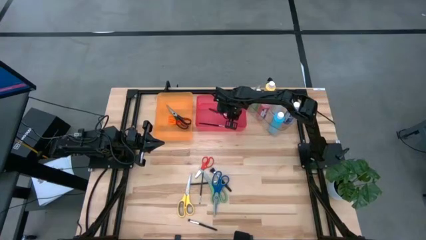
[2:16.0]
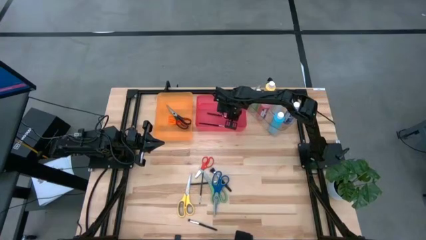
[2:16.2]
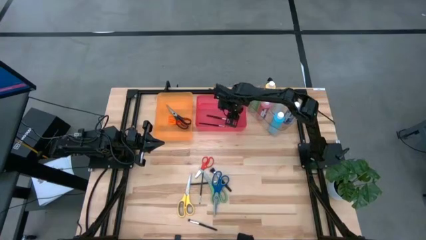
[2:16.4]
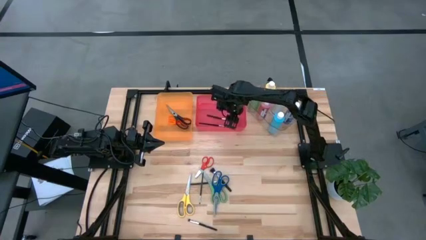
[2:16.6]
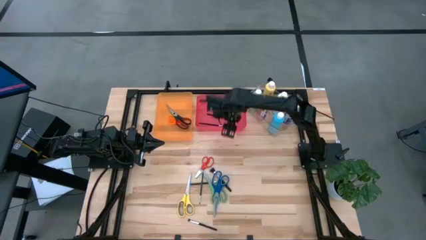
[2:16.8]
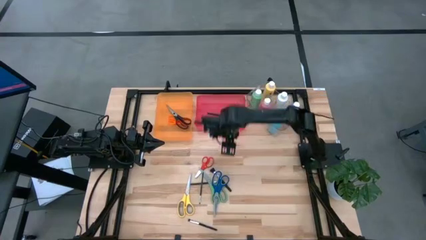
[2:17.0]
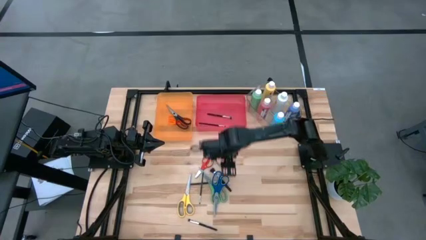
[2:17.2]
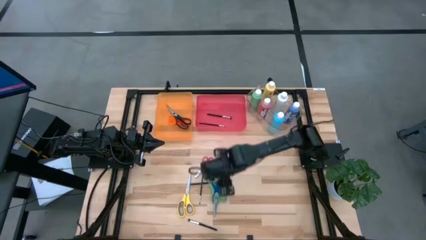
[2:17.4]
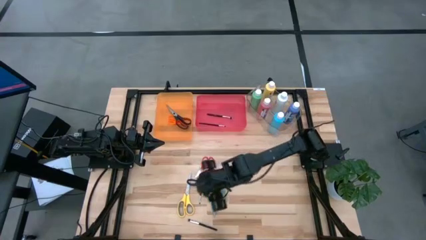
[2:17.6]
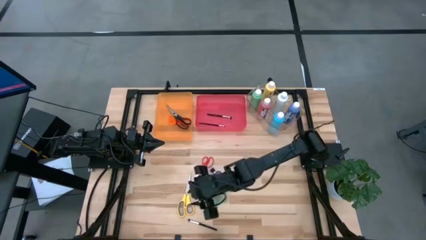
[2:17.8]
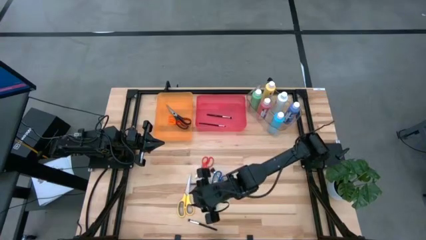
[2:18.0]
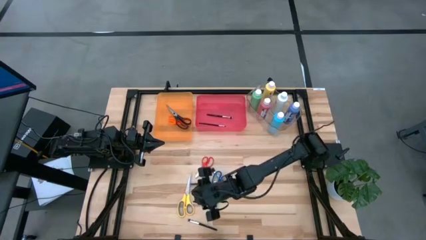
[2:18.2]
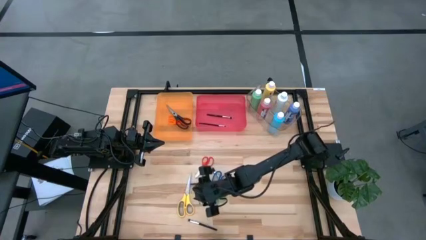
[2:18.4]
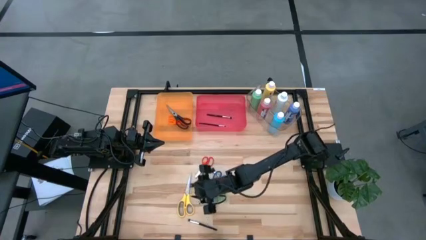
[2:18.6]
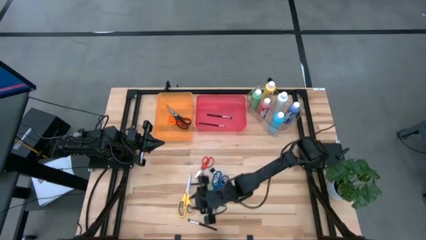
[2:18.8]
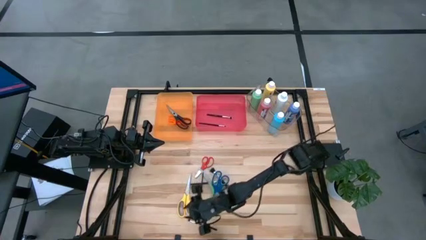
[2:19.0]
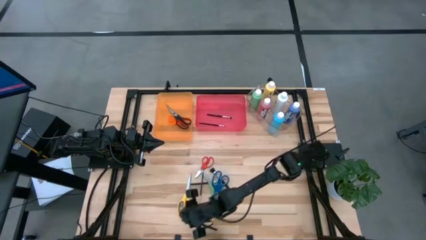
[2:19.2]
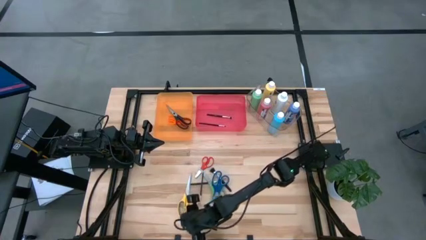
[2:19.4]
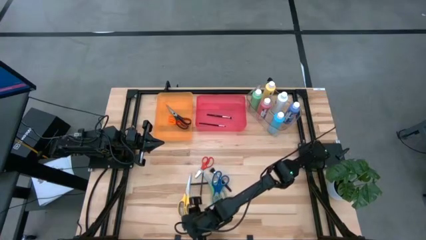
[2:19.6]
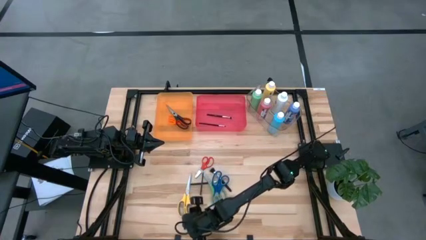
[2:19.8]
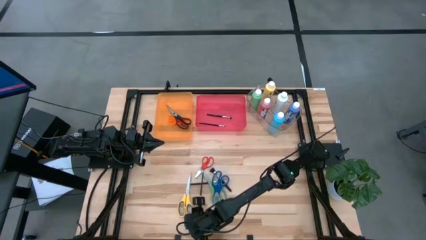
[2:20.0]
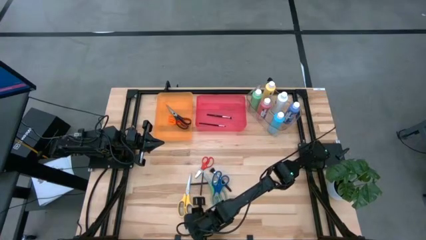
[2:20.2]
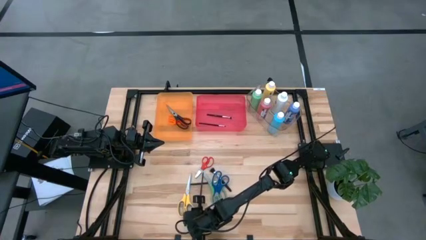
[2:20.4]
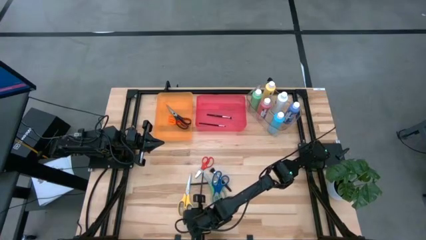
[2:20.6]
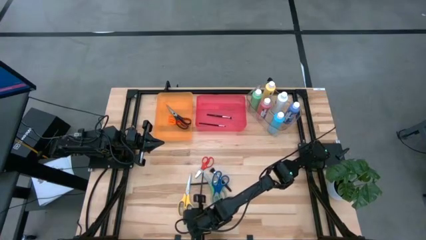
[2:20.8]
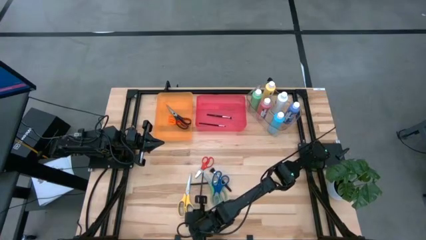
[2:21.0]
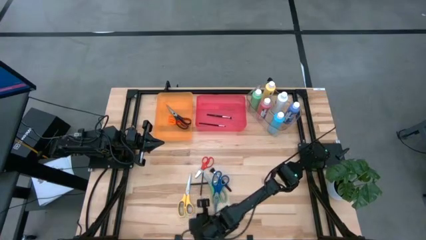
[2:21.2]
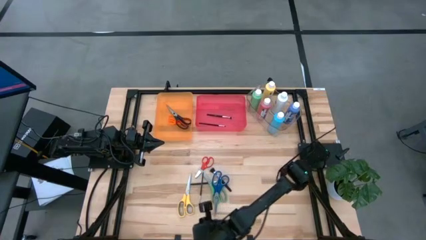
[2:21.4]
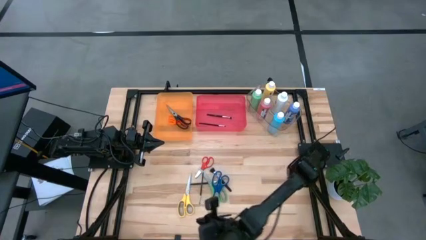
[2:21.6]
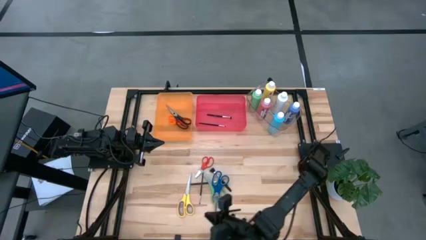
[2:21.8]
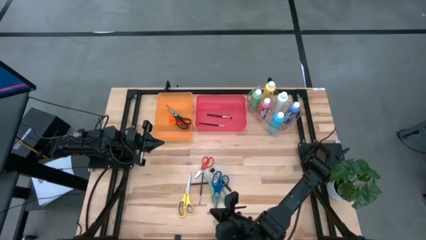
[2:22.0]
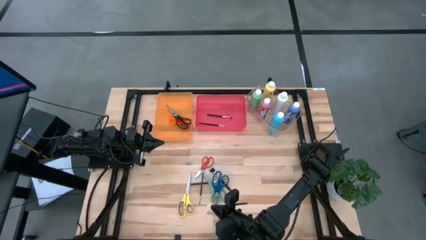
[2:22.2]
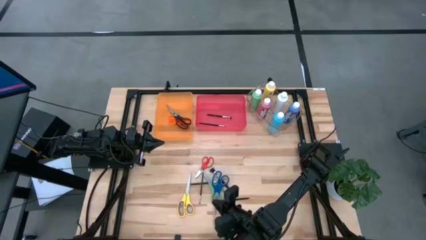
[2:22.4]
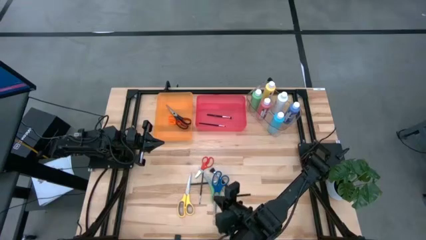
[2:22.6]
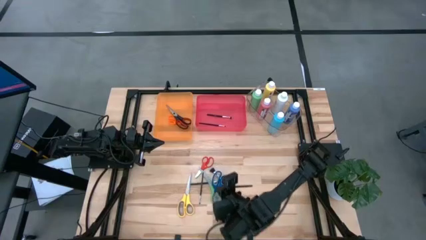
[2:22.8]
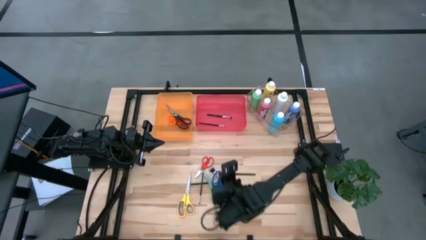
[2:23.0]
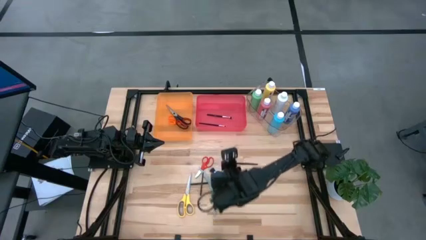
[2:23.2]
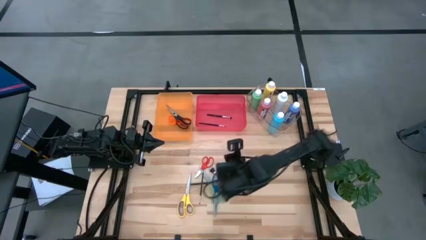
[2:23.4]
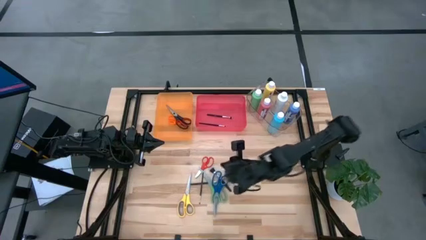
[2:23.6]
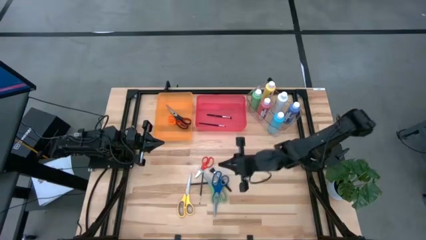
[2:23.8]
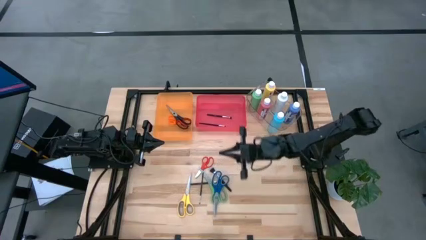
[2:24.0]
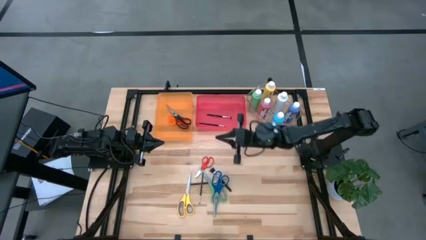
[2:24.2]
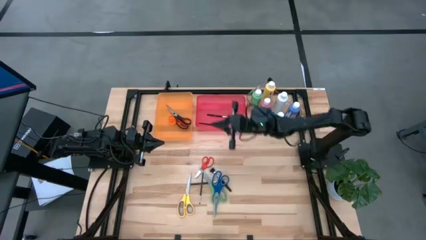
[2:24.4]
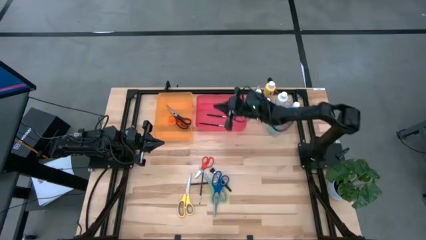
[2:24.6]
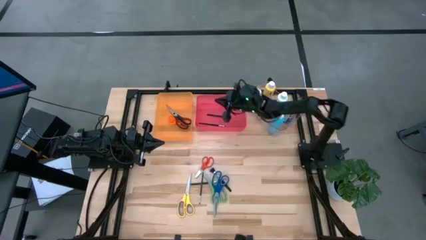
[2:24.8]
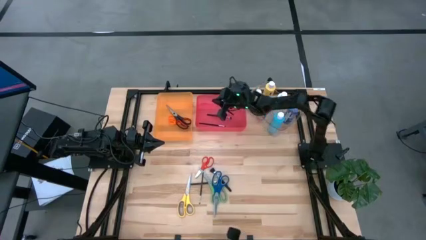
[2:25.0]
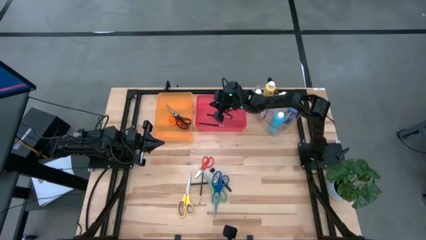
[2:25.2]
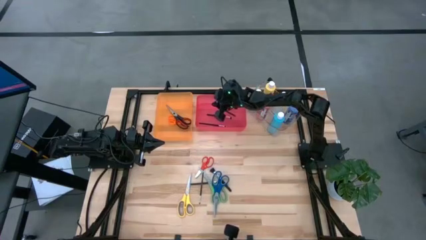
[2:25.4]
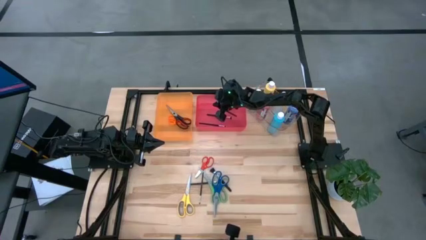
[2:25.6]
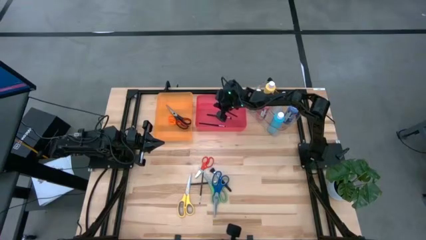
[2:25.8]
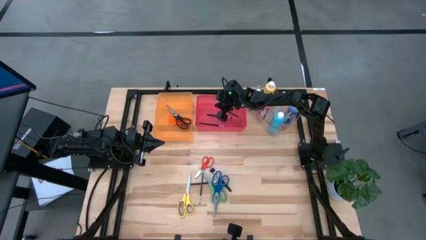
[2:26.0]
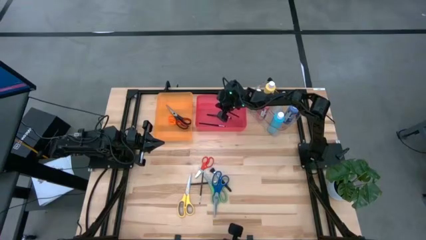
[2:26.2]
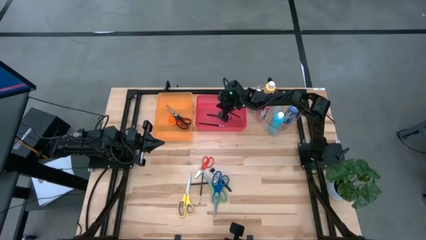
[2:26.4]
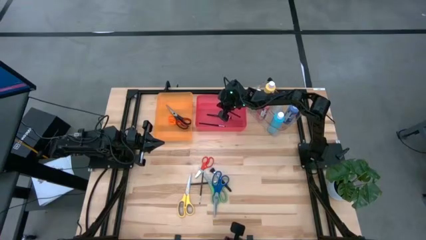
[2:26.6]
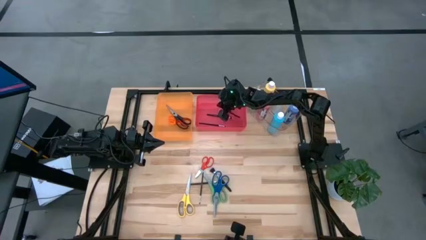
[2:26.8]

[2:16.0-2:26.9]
Task: Pick & Place Paint Supplies
Put the black paintbrush into the pink bin

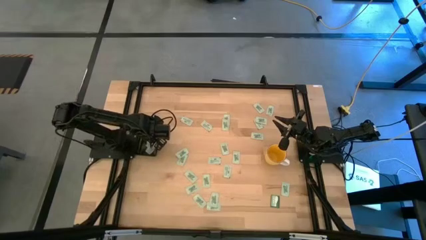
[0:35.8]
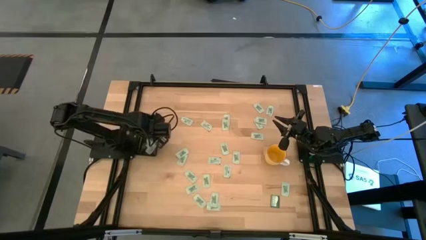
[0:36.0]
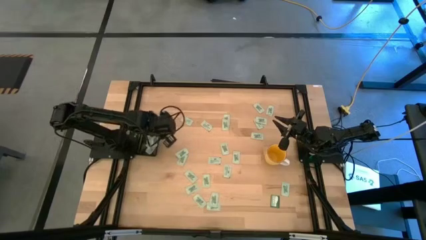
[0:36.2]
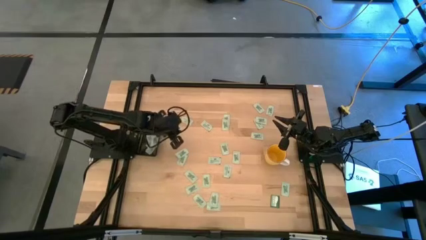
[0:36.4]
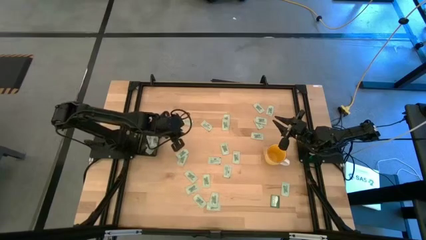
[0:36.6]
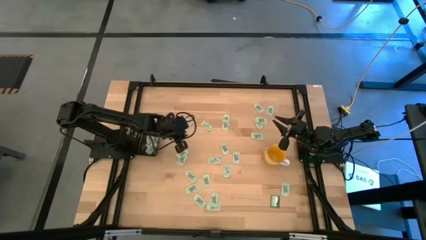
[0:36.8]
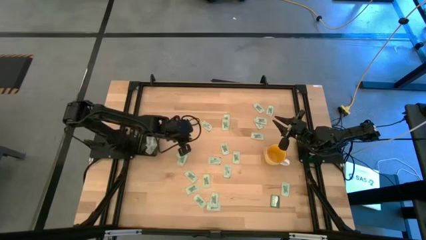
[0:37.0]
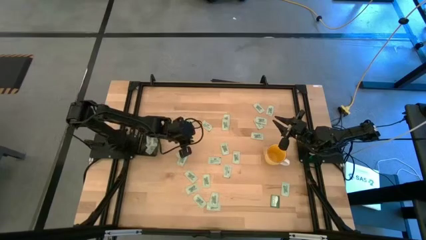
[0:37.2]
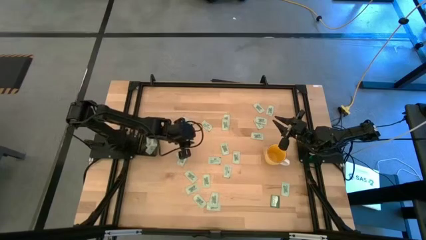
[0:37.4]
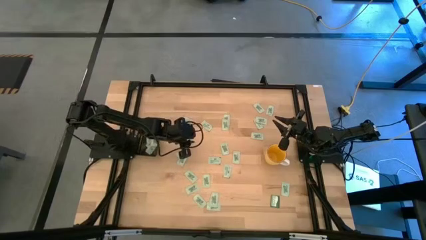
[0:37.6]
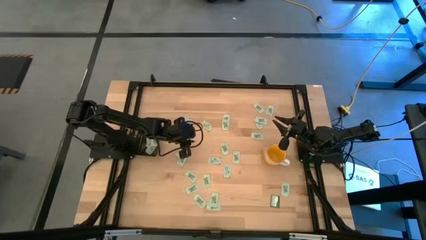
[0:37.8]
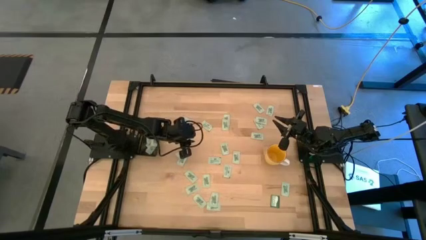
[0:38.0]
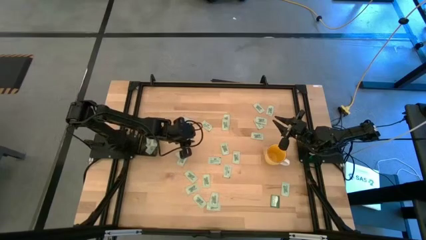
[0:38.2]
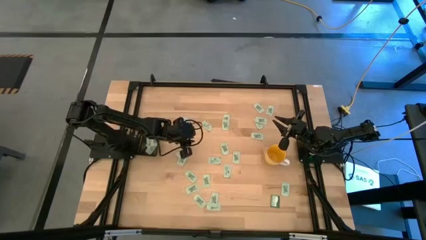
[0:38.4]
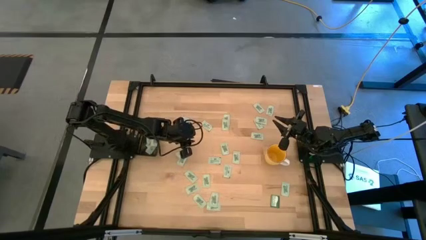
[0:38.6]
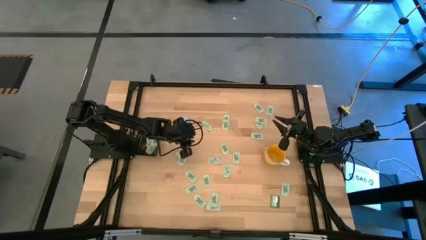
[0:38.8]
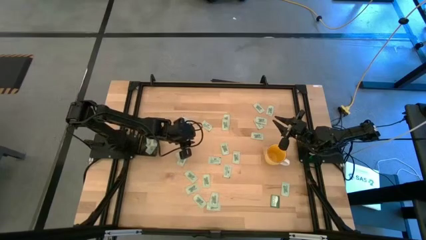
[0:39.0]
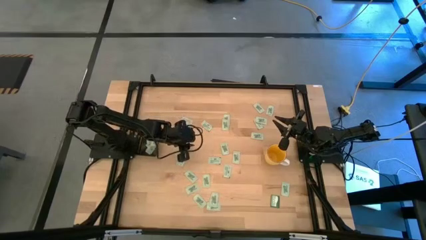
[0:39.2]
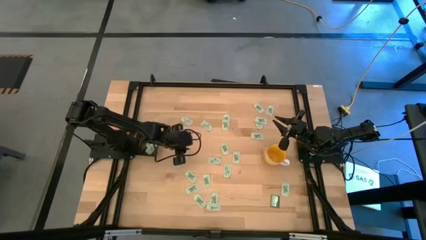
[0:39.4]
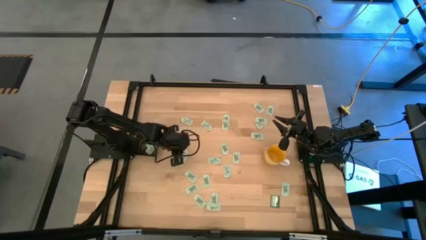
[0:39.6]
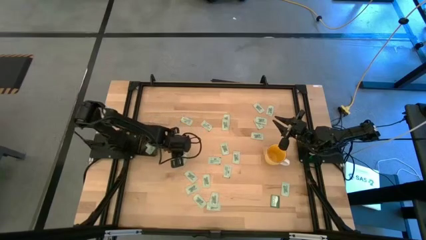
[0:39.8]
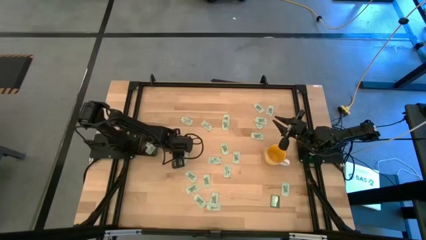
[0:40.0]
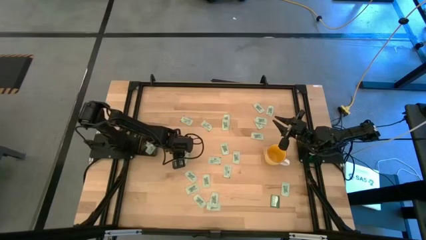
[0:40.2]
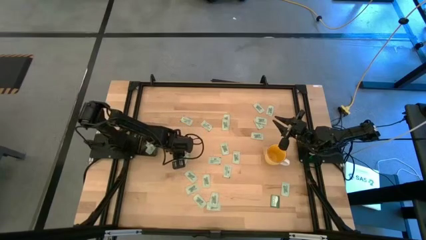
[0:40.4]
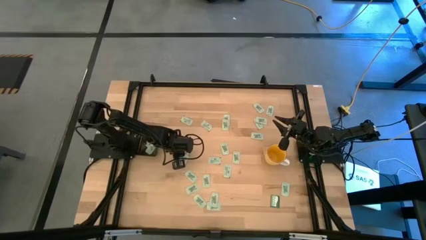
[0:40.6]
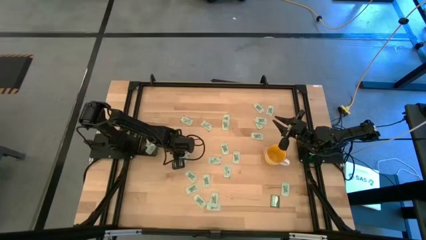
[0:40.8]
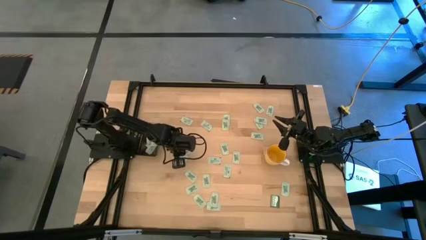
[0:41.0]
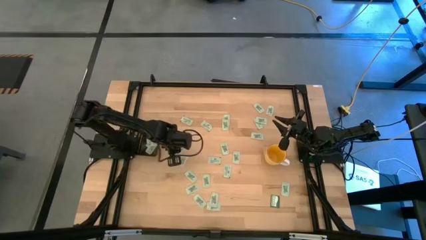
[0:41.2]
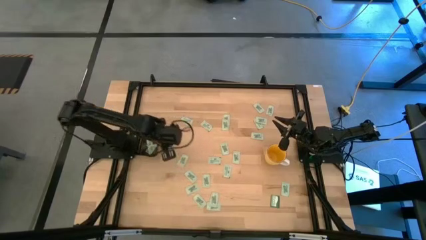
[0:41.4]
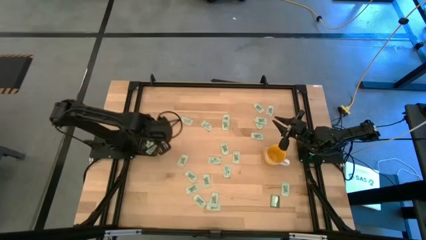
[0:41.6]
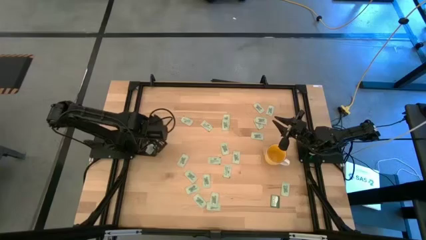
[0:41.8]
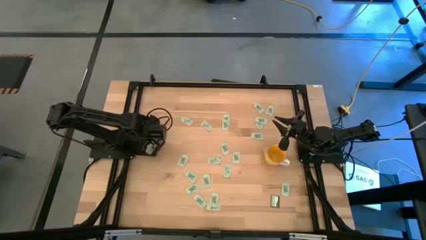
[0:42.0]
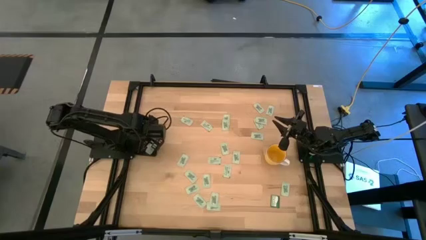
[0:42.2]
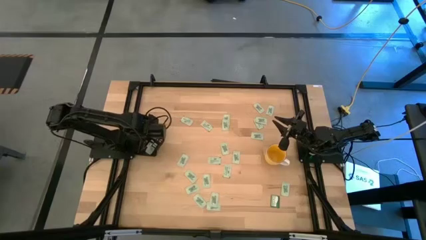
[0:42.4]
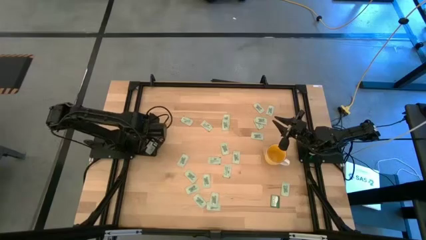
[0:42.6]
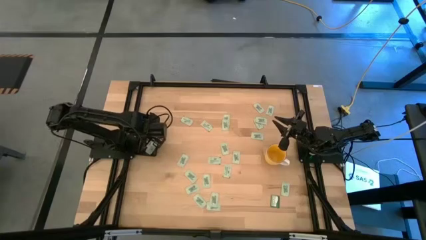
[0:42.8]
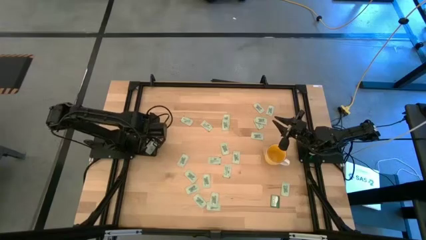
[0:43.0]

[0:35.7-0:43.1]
Task: Pick and place Stevia / Truvia into bins
Put the stevia packet into the black bin
